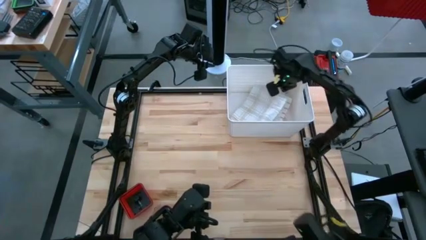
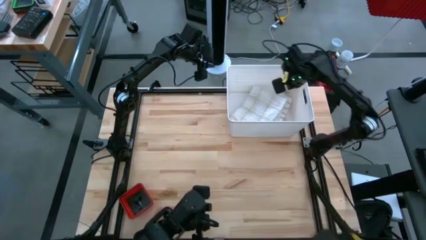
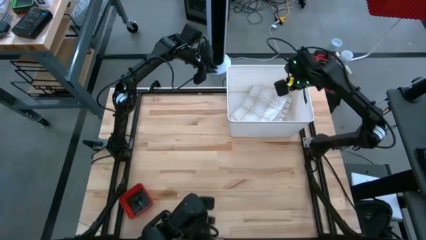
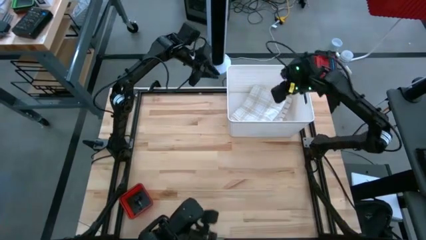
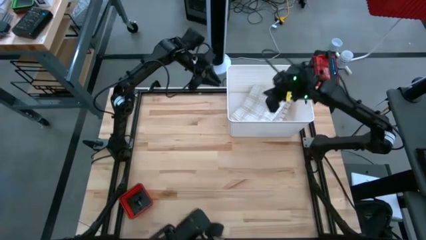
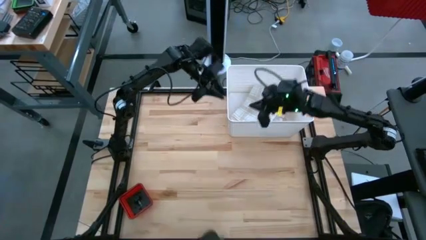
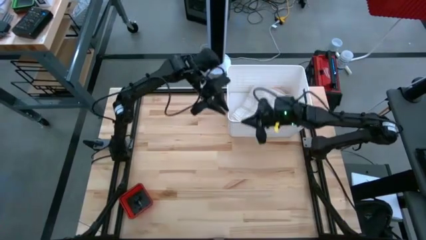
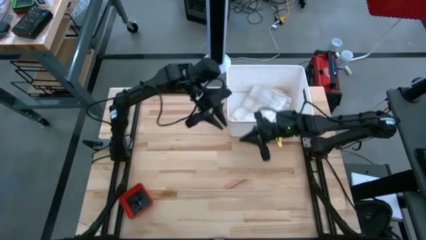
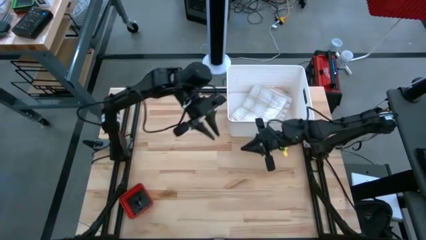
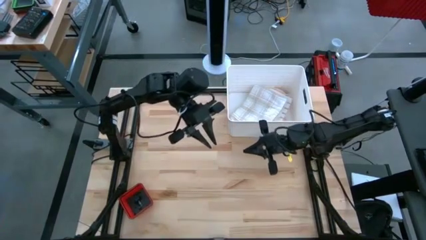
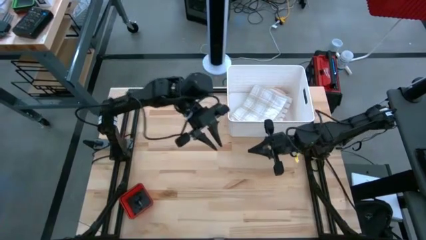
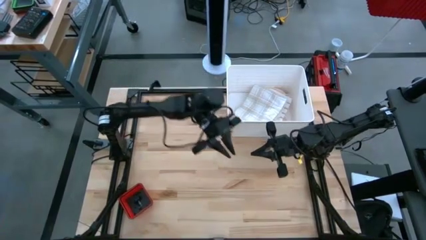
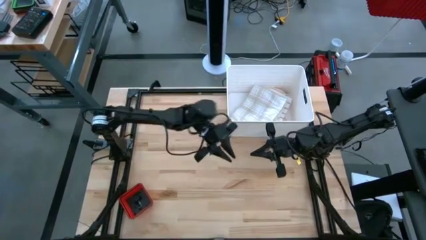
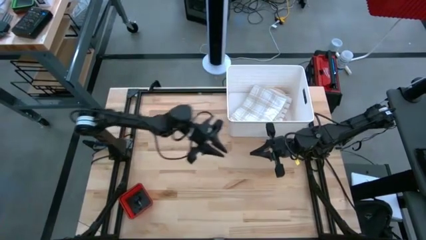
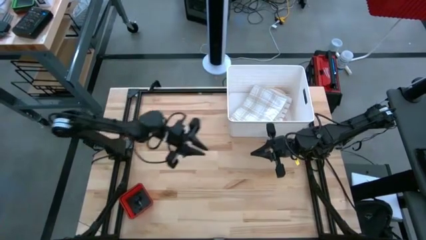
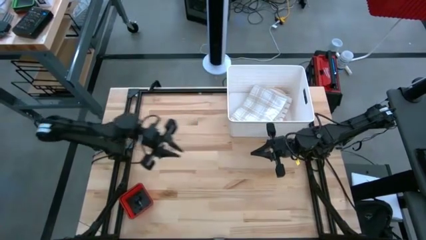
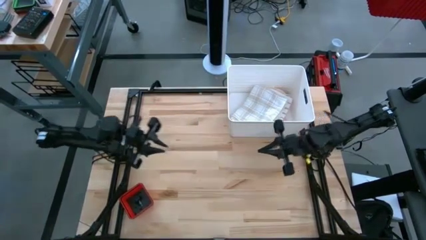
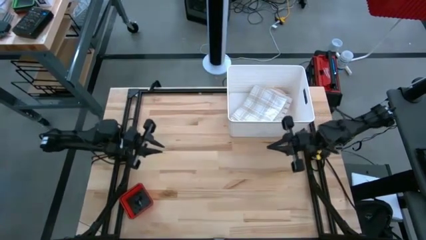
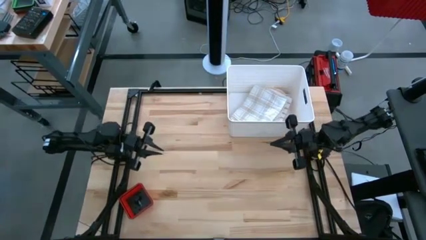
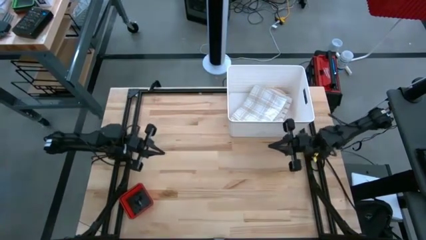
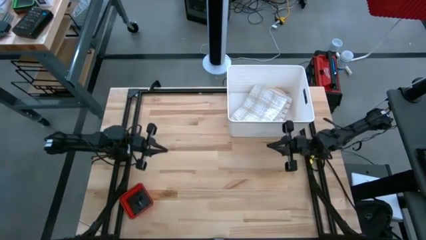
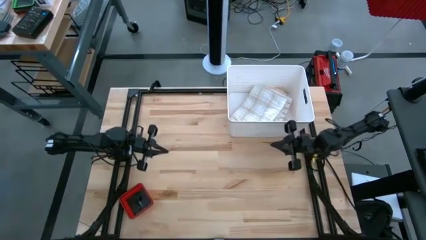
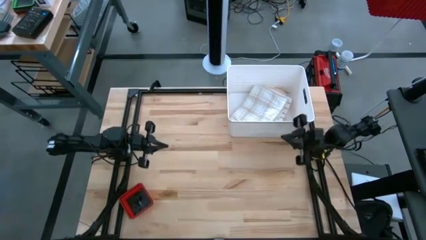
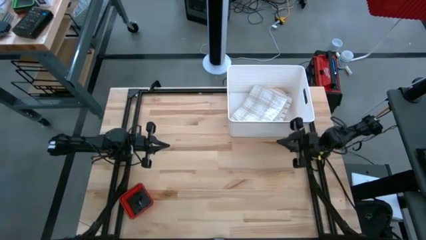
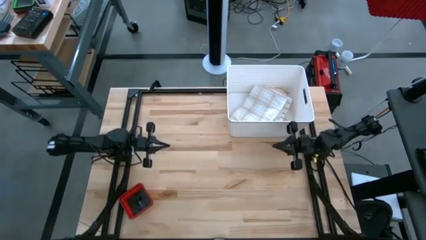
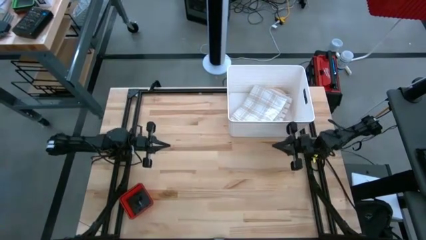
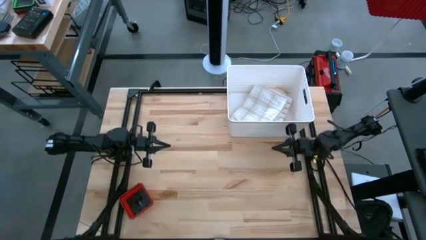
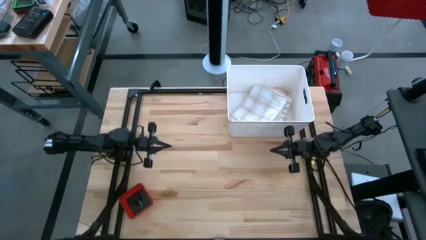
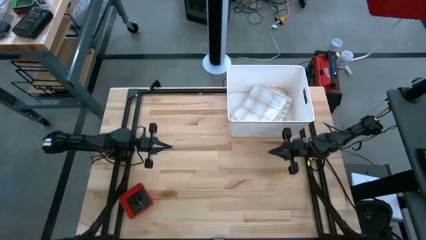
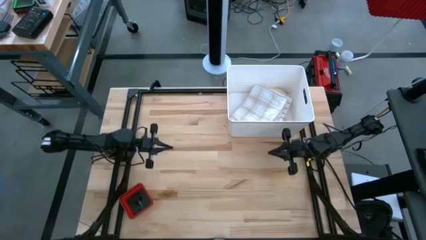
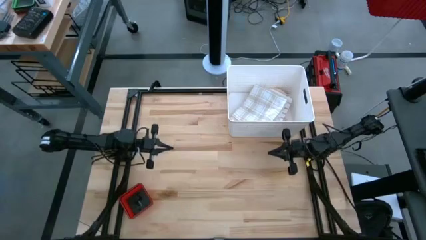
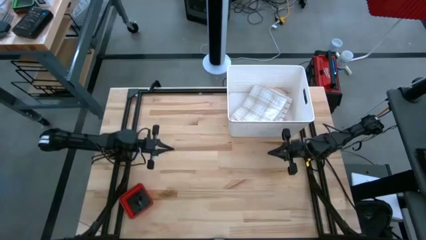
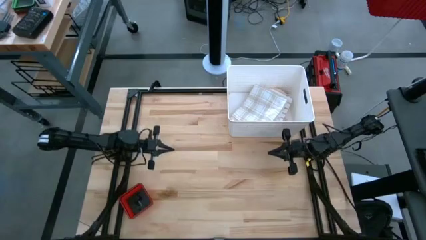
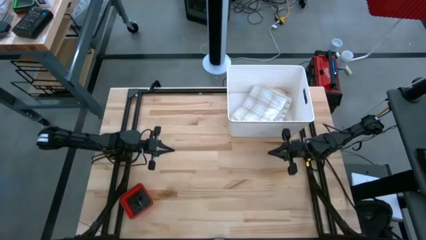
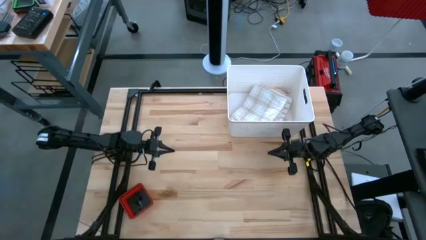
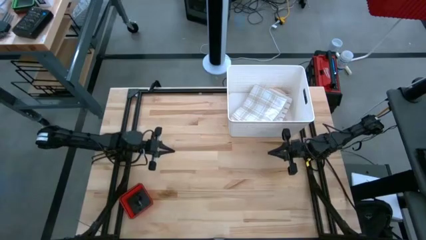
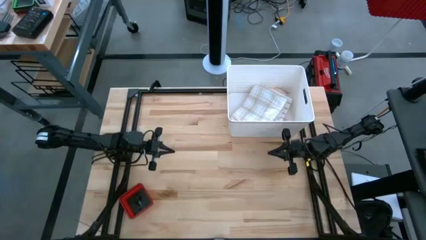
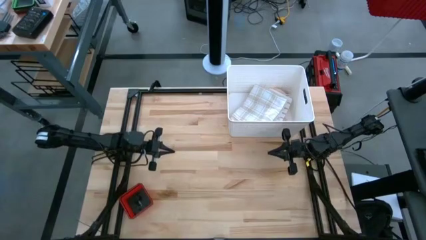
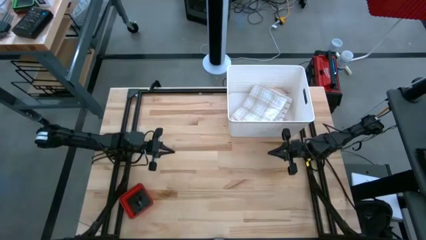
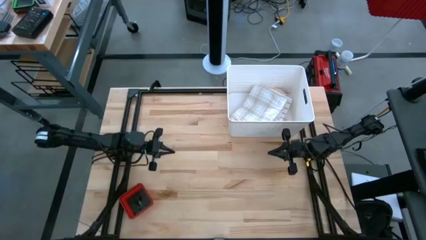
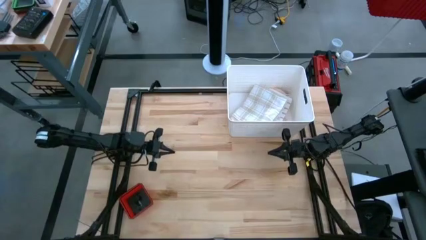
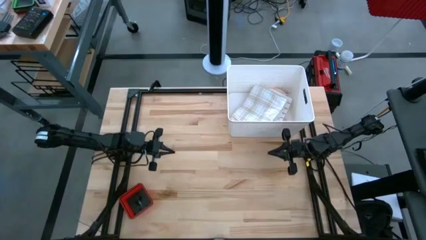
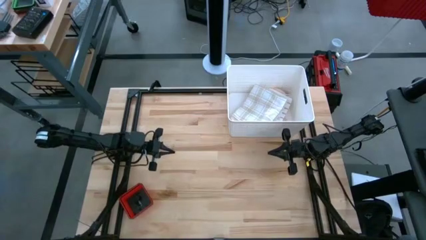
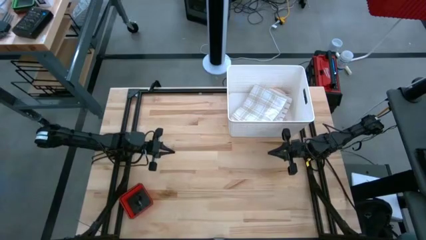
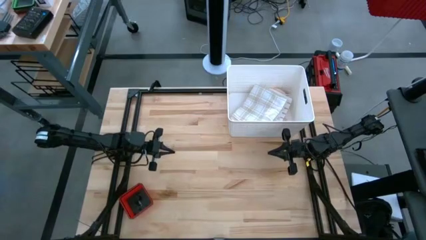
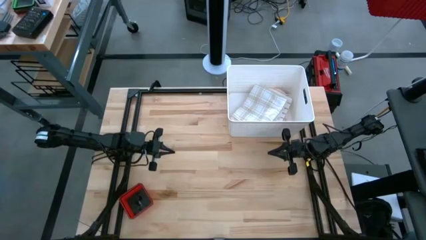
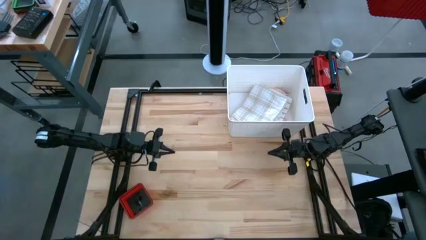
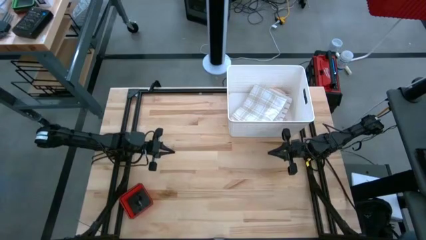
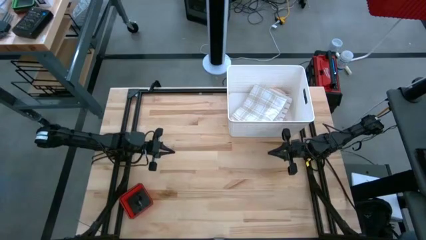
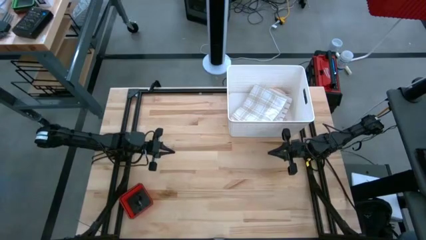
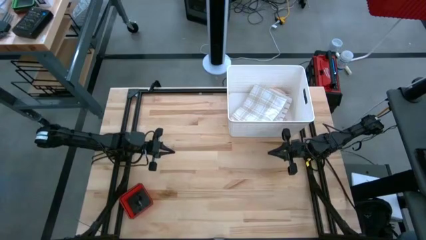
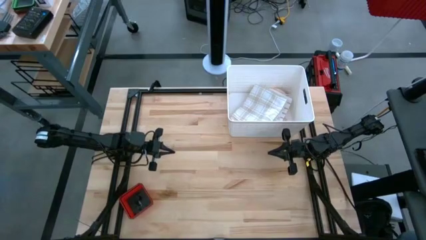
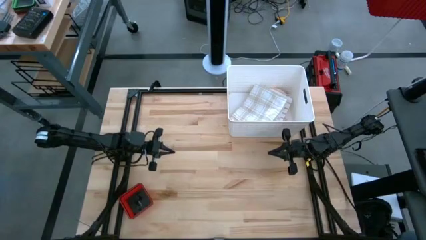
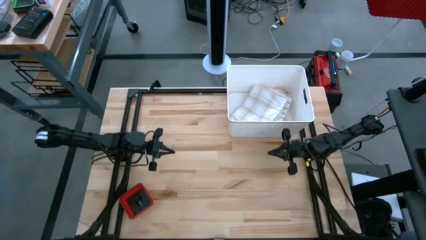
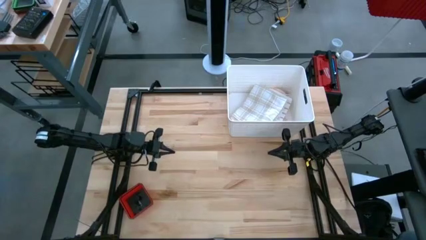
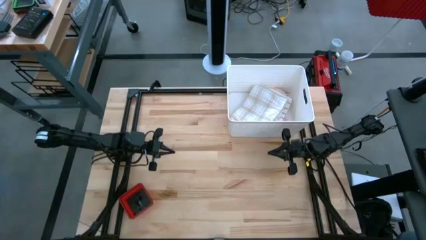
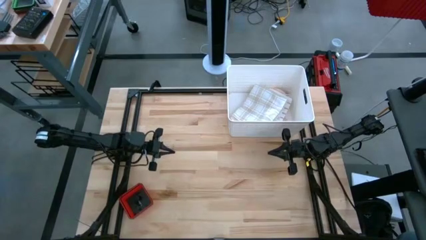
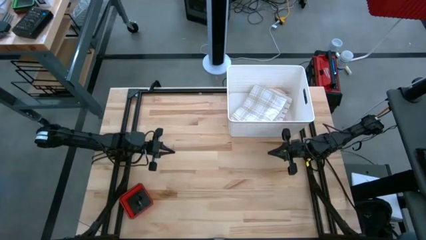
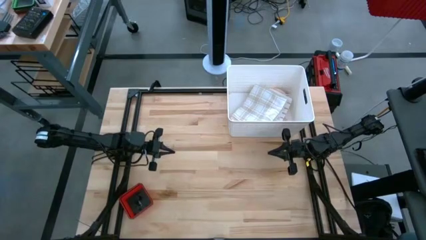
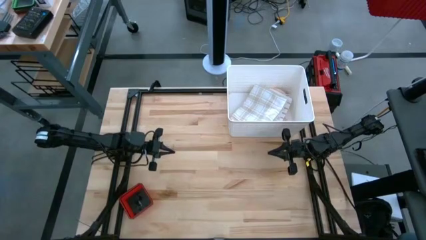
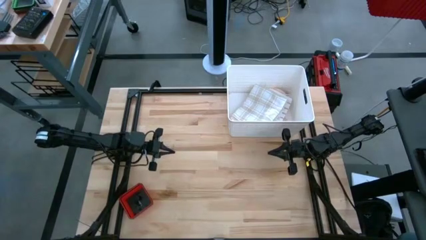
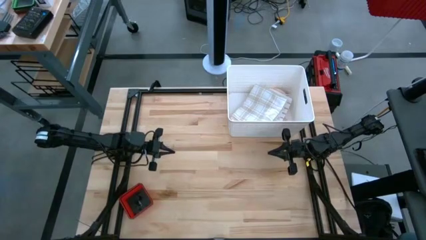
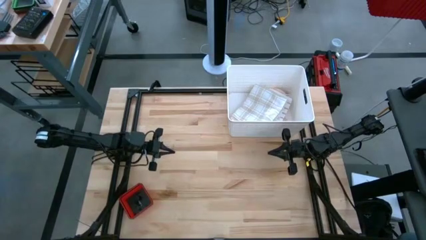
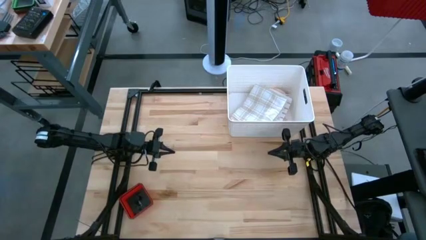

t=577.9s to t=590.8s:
Task: Fold towel
Return to Home Position
